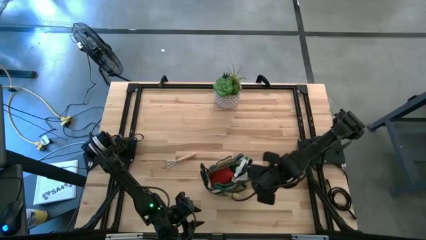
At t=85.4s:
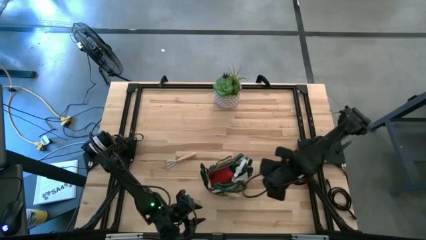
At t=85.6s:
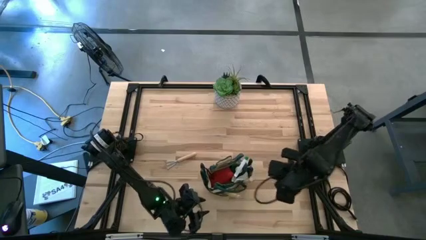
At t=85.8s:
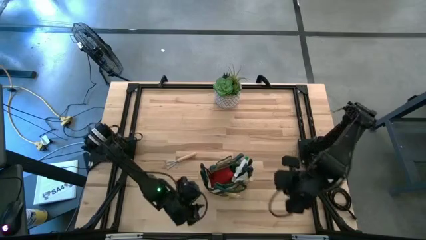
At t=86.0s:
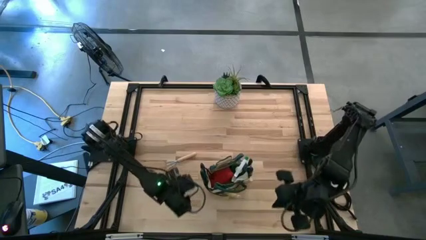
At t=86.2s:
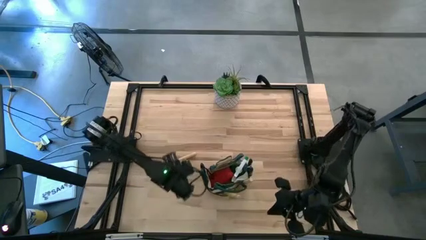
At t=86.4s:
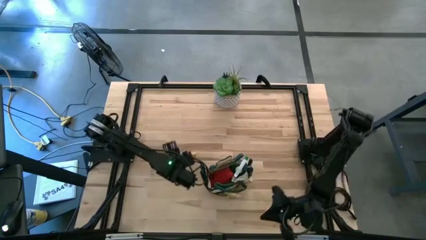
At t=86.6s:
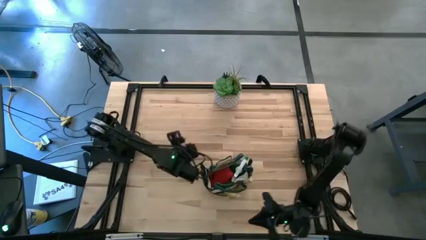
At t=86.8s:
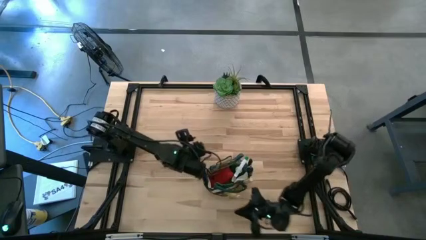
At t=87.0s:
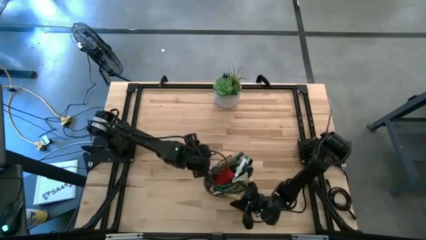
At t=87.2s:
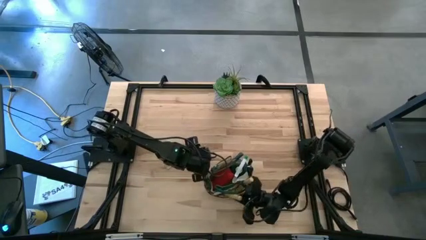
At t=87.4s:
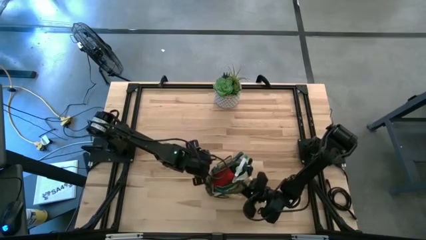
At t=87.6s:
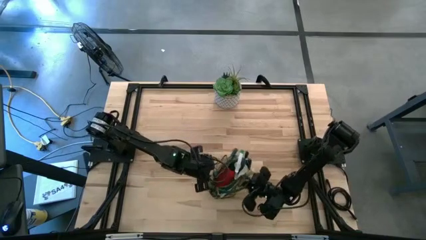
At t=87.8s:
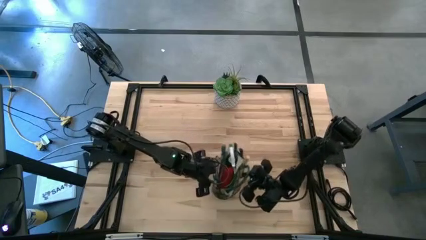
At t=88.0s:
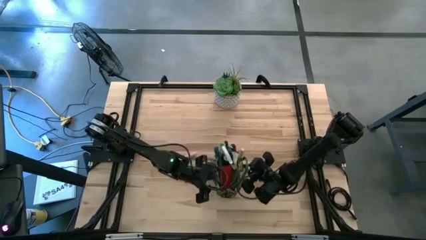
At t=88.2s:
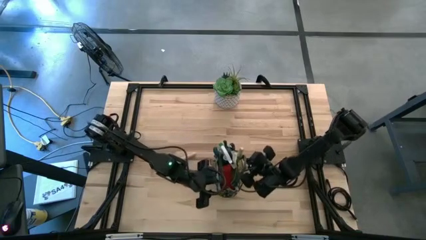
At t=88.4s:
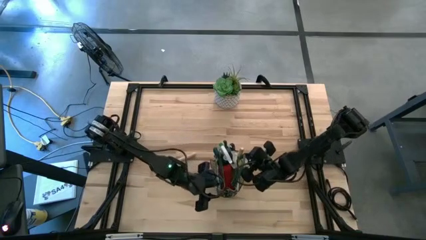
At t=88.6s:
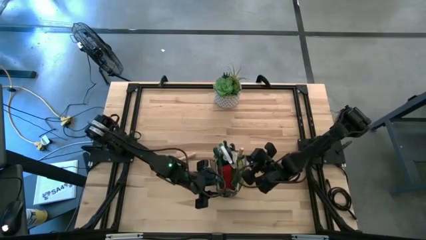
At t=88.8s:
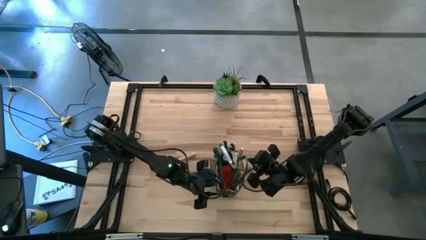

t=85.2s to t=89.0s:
Task: Pick & Place Garden tools in Gardening bag
Adjust the green gardening bag on the table

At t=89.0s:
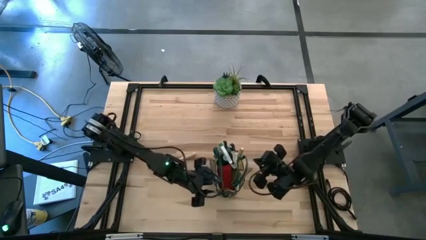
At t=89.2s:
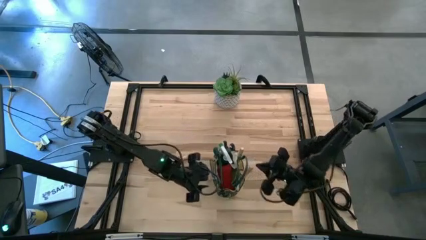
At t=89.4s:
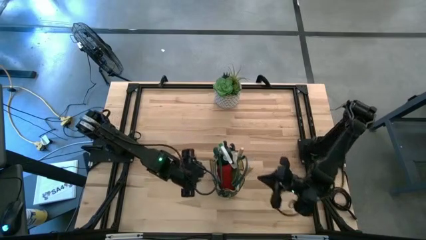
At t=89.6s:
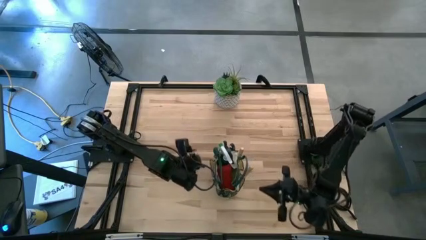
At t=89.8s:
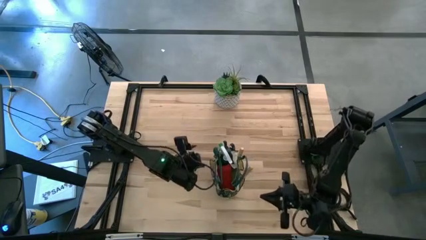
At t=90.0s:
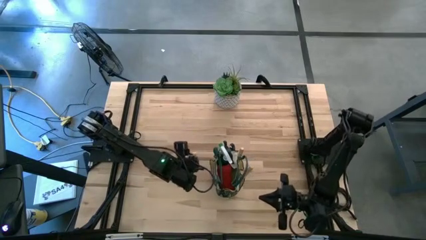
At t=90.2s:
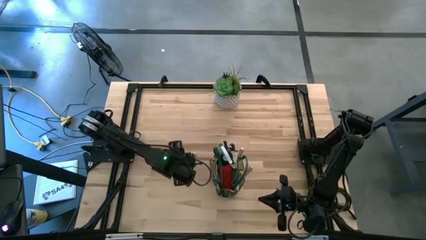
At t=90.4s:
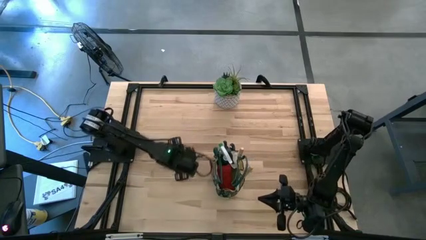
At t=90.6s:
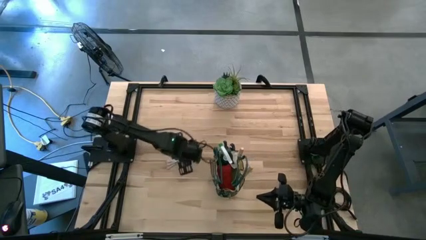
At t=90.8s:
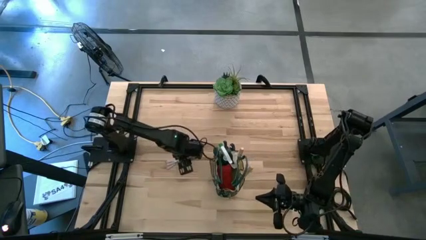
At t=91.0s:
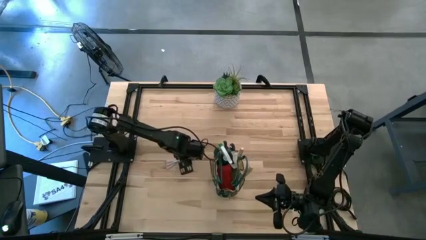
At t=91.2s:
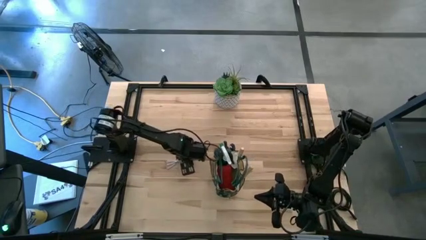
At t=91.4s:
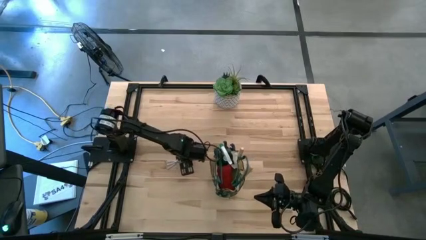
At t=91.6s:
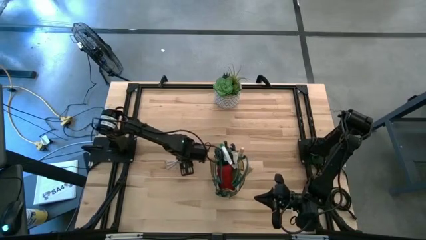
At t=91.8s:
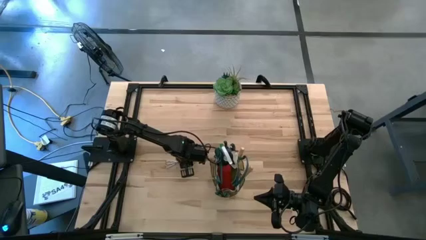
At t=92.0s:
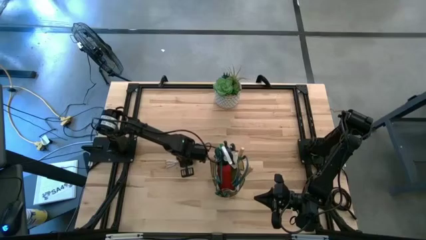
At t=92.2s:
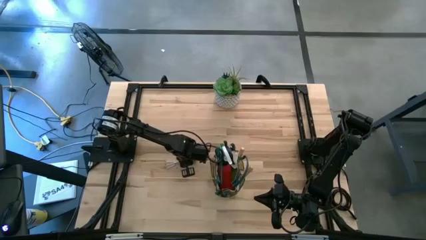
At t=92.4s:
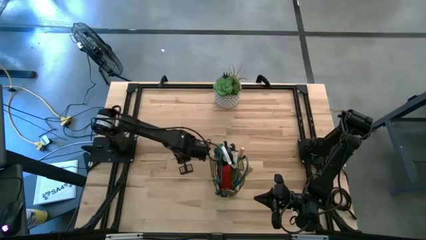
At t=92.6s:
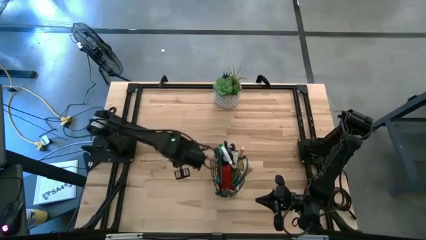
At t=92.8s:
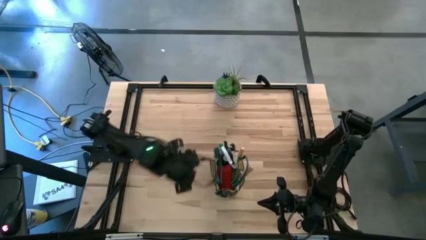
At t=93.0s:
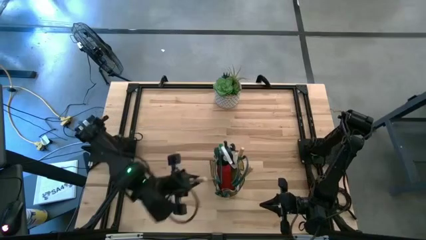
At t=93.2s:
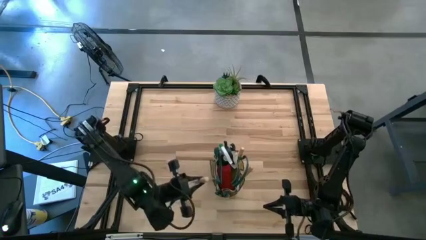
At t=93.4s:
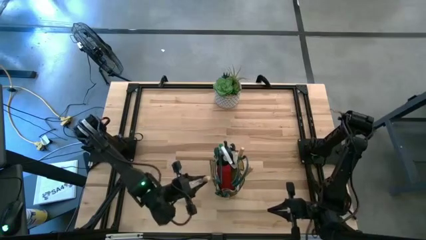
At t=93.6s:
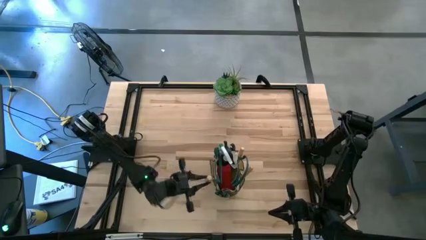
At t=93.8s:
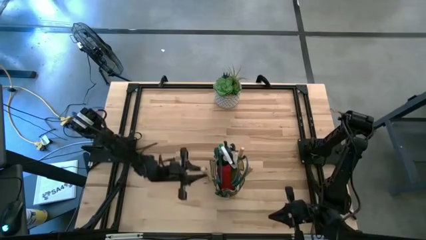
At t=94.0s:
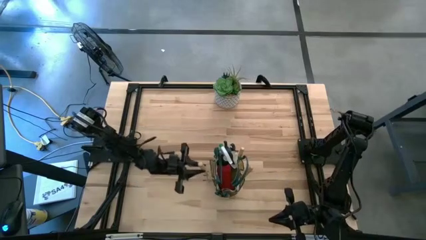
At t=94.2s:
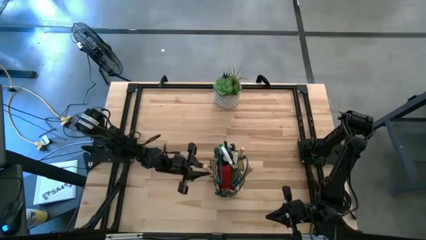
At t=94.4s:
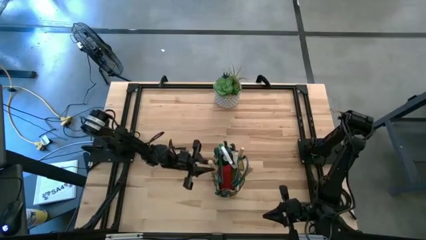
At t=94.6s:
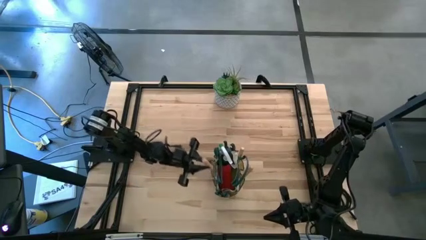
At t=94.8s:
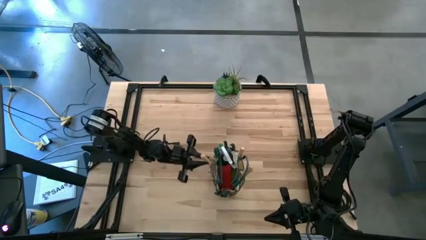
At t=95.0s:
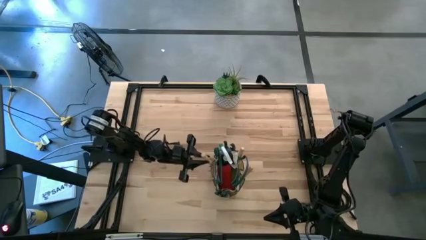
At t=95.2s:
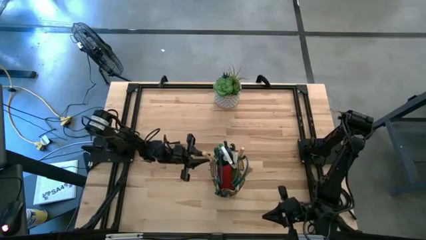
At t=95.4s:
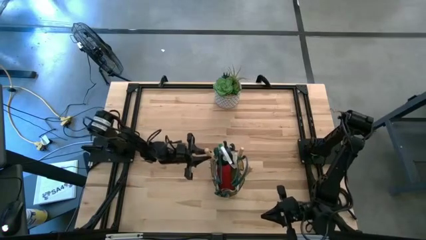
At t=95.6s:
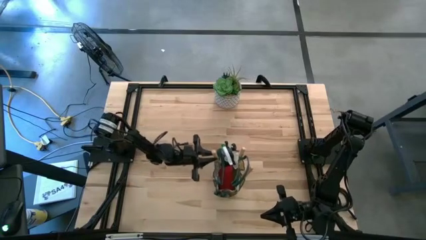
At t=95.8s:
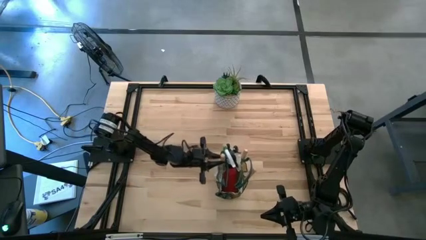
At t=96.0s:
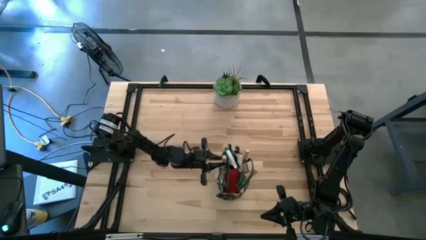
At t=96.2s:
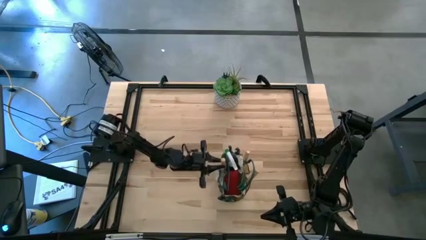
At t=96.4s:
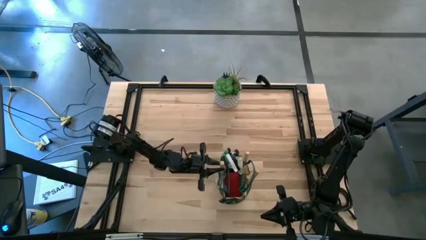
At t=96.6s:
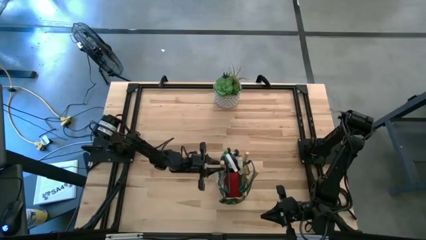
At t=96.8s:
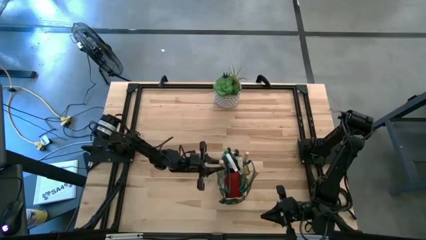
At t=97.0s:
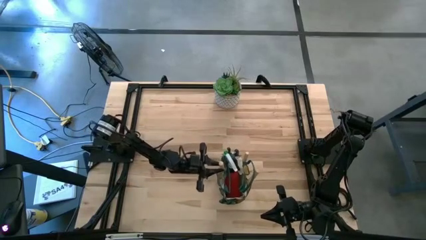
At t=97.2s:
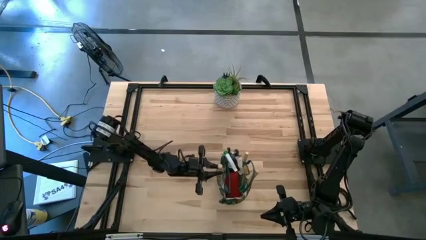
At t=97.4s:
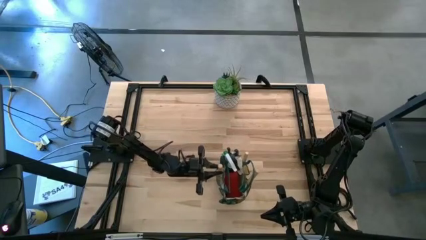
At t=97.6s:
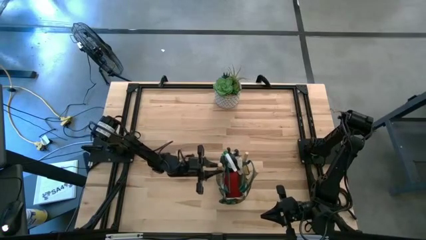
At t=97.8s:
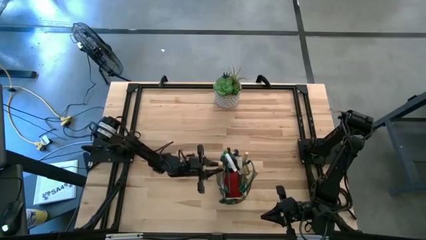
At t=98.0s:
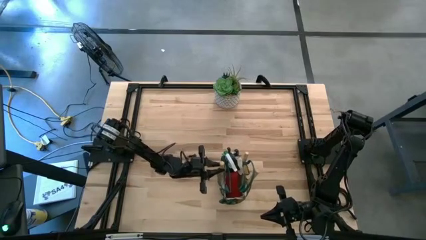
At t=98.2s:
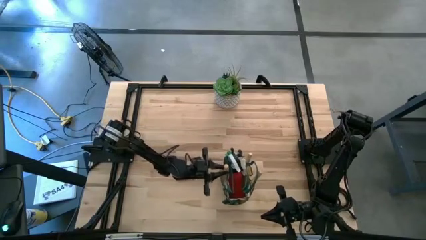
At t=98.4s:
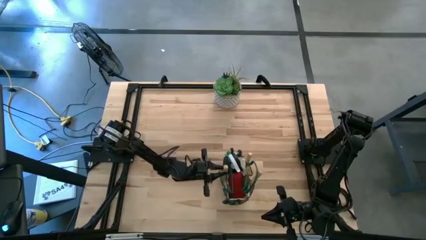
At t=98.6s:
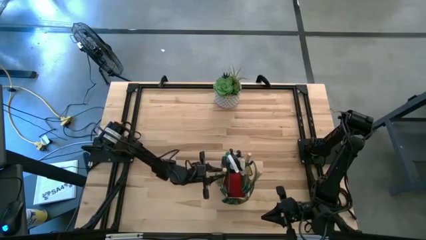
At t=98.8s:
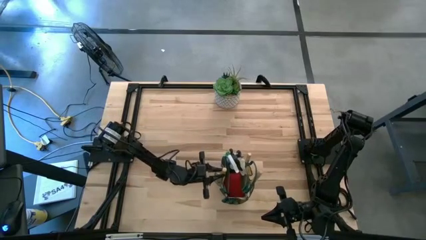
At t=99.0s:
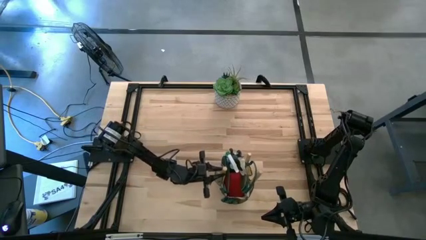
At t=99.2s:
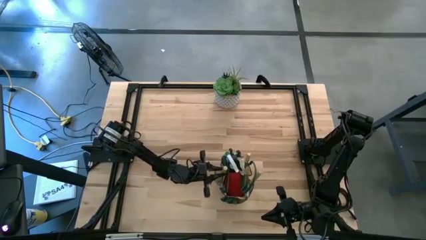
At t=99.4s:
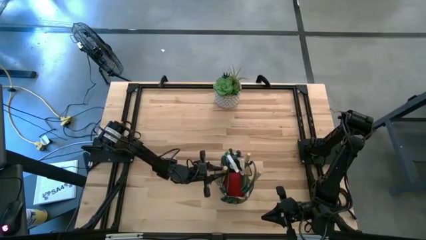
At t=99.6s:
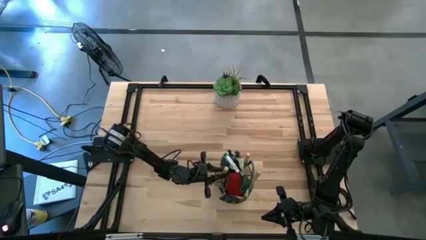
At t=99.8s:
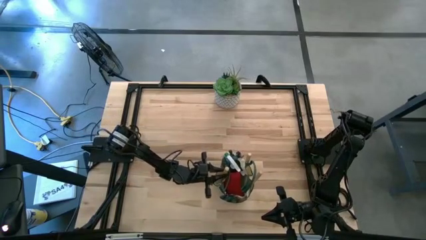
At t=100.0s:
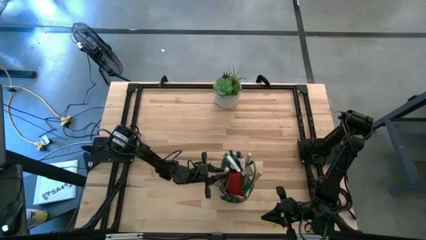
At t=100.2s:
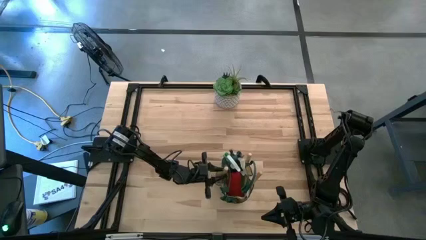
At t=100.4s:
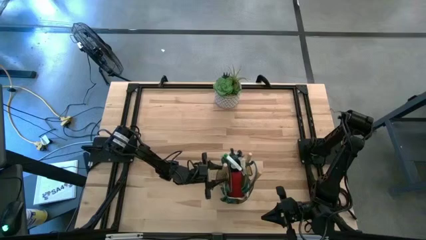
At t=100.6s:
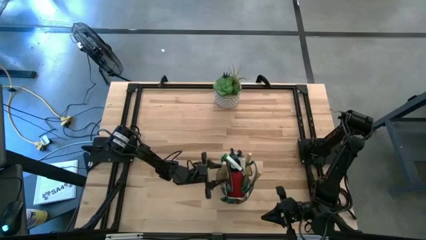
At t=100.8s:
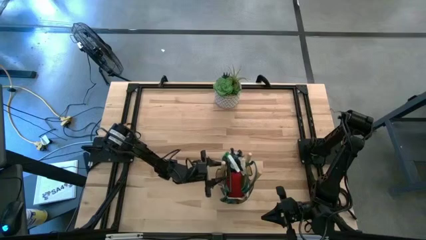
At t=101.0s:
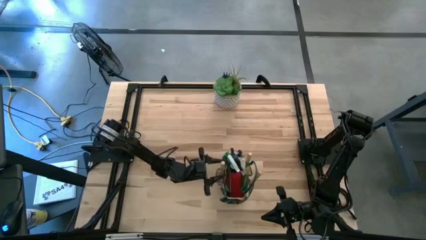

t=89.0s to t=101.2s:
Put the brown hand rake into the green gardening bag
